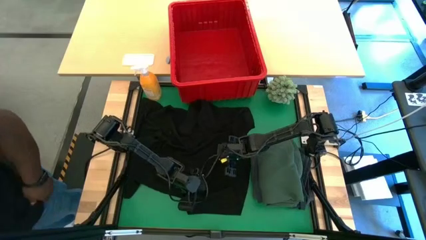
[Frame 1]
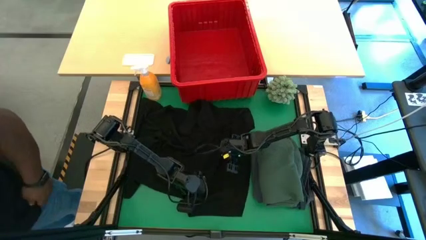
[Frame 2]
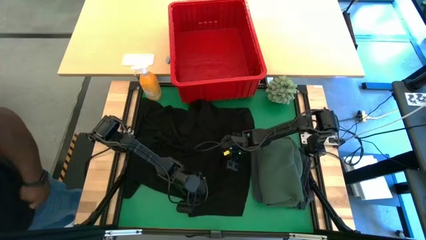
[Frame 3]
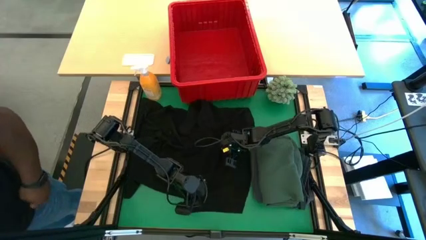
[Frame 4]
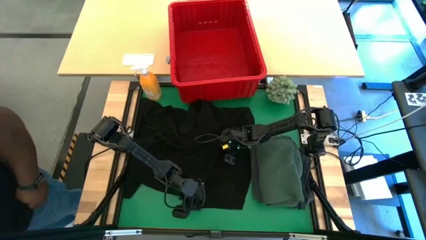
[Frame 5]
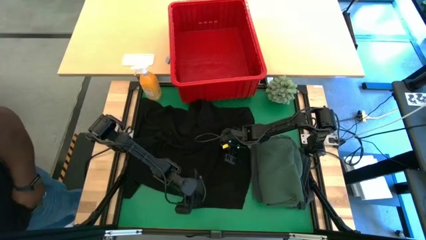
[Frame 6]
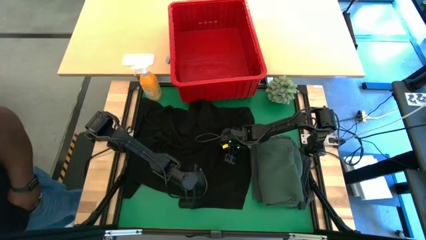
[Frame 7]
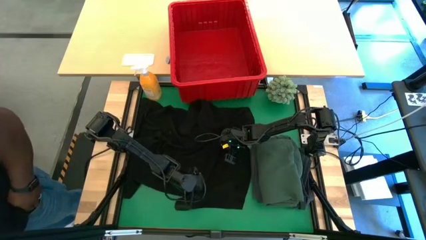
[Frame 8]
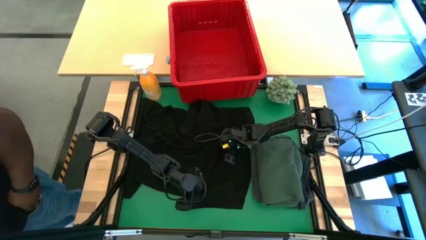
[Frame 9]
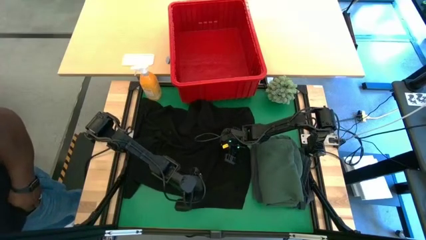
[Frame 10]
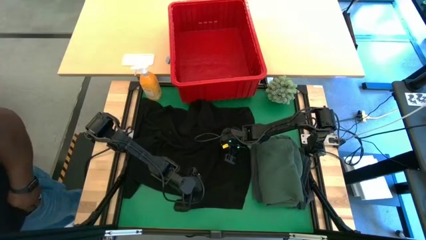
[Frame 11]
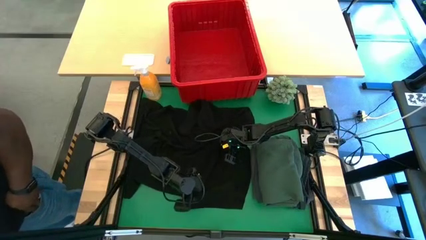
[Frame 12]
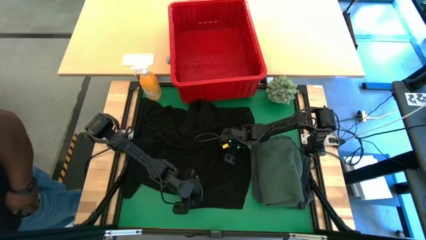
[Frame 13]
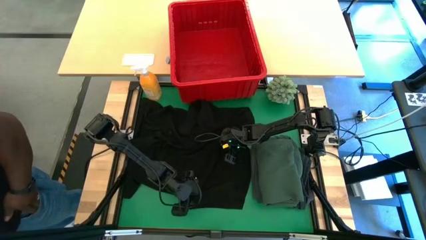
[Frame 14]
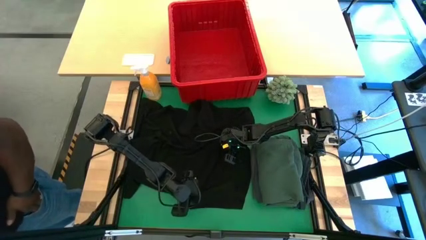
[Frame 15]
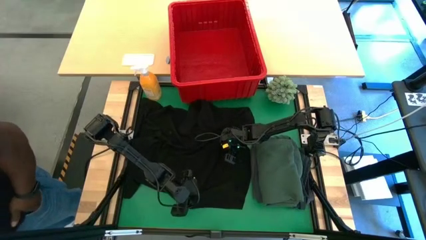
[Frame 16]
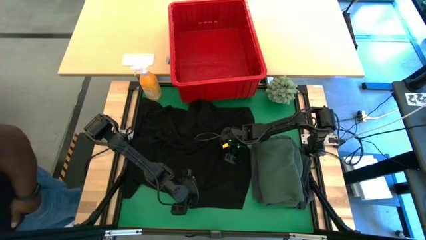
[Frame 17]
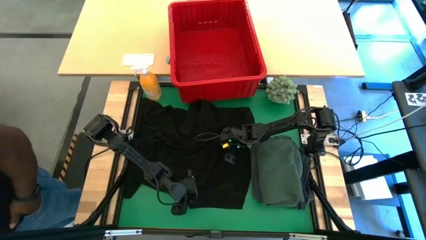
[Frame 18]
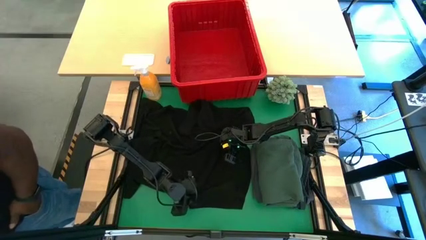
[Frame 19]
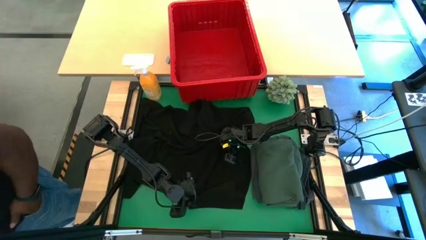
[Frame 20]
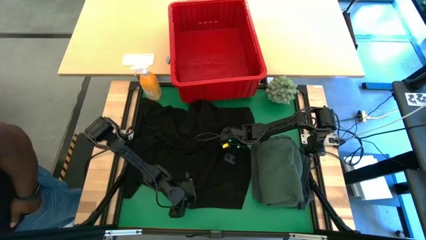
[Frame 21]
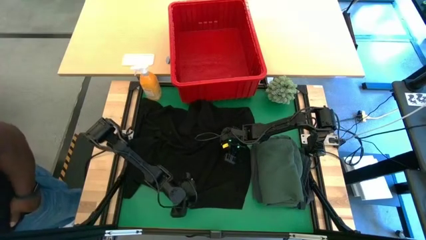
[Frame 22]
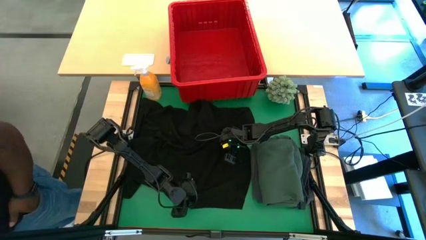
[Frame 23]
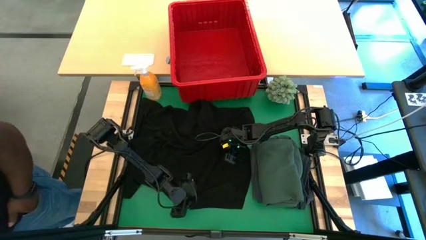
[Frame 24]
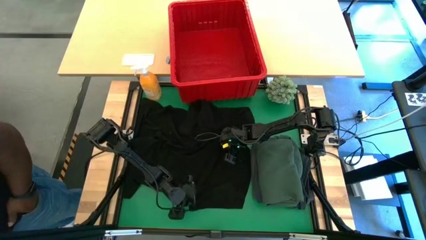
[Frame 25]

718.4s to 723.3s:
Task: Fold Laundry from Bin
Fold the black shirt

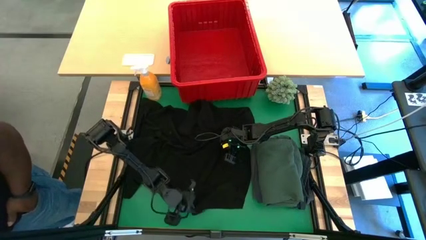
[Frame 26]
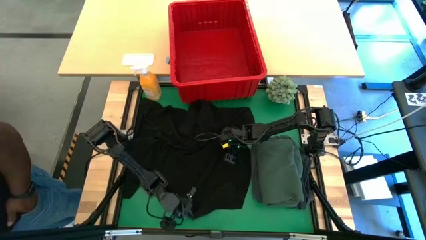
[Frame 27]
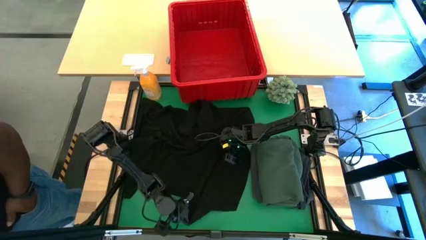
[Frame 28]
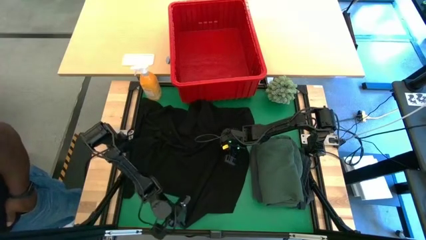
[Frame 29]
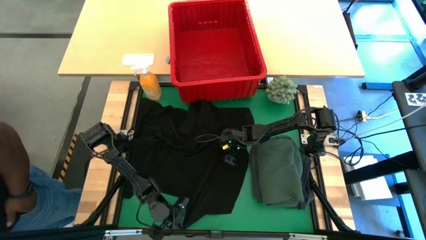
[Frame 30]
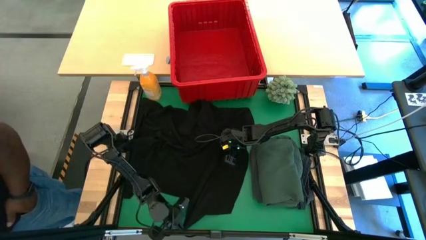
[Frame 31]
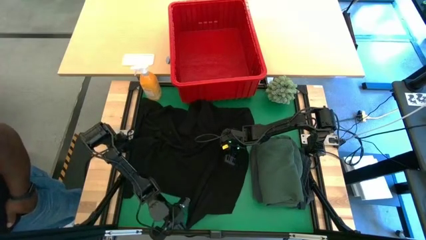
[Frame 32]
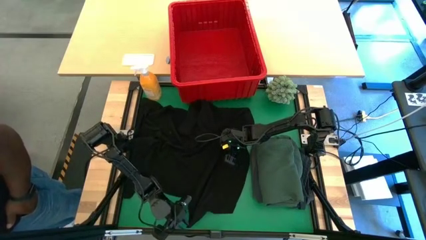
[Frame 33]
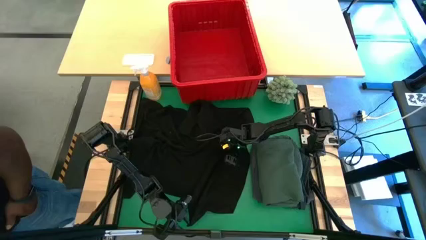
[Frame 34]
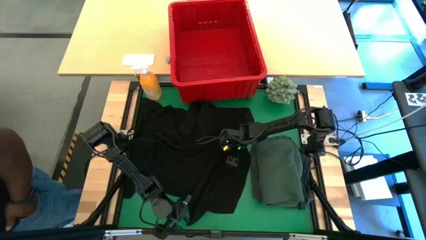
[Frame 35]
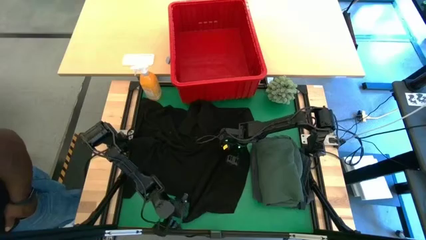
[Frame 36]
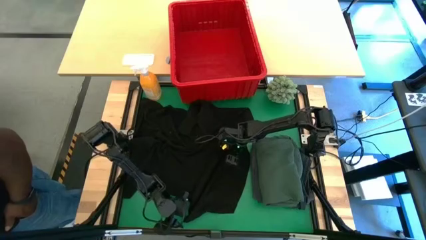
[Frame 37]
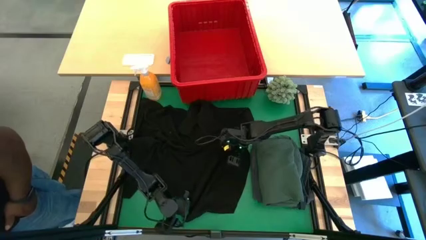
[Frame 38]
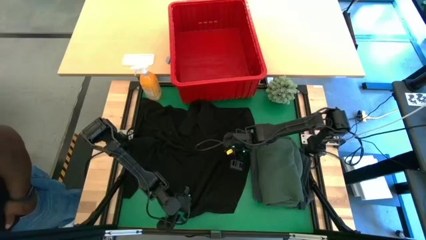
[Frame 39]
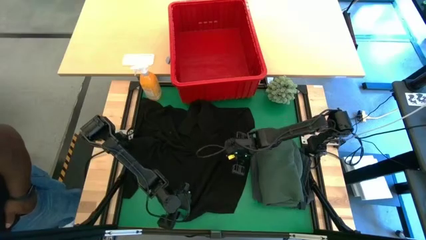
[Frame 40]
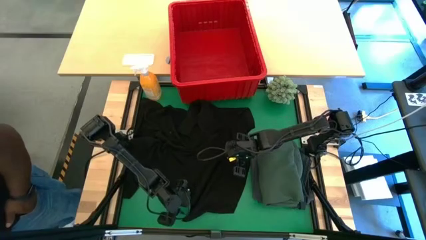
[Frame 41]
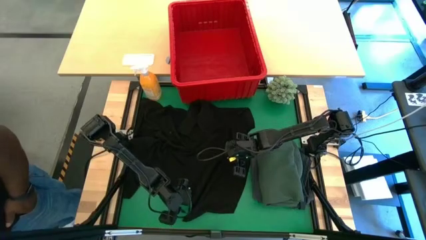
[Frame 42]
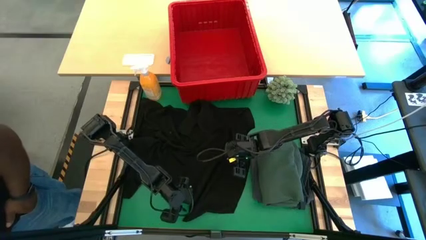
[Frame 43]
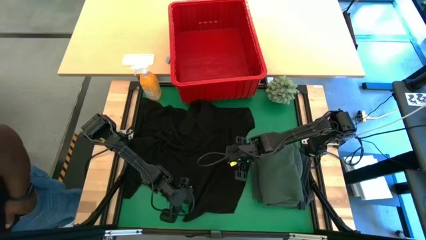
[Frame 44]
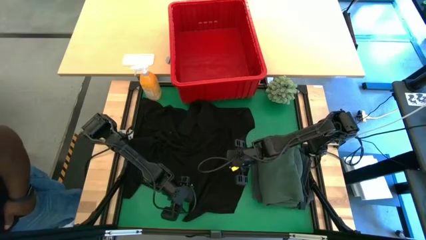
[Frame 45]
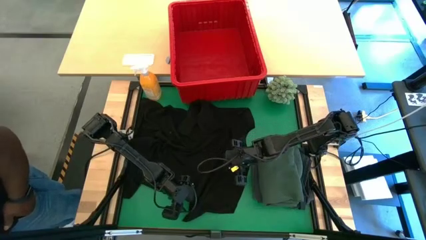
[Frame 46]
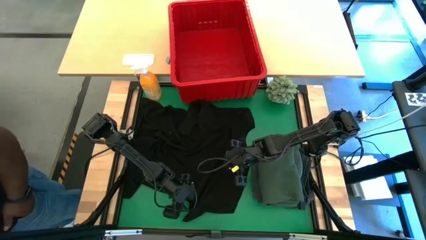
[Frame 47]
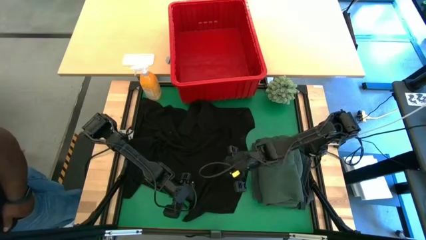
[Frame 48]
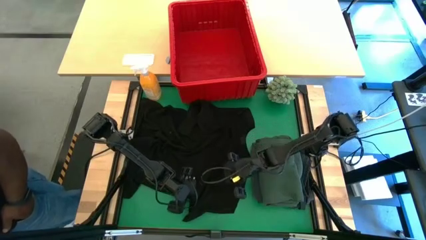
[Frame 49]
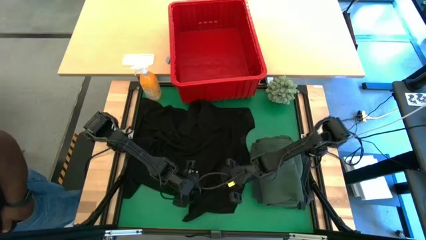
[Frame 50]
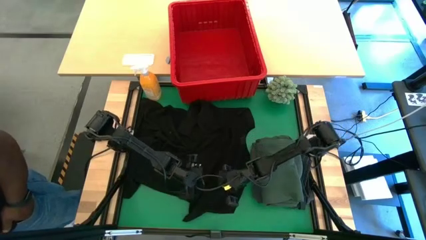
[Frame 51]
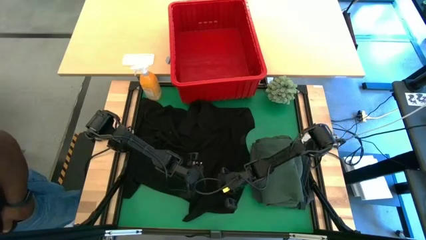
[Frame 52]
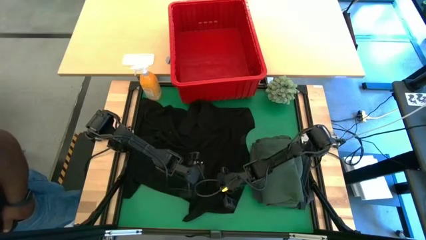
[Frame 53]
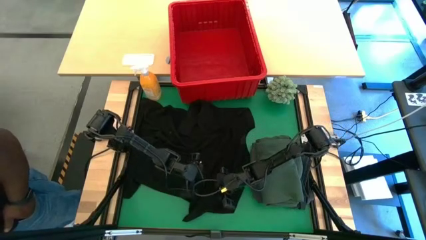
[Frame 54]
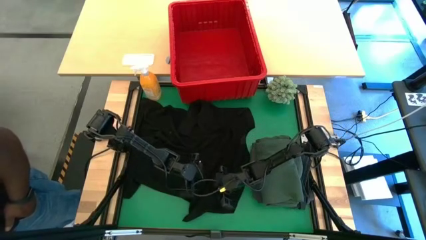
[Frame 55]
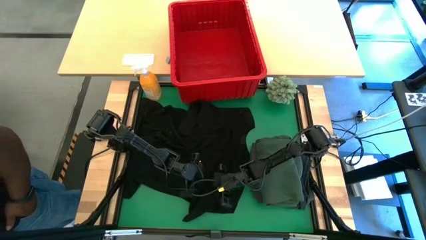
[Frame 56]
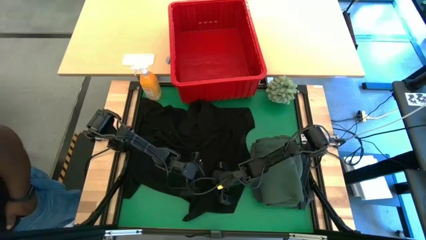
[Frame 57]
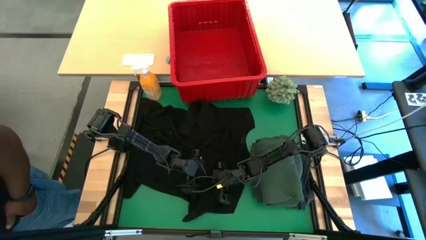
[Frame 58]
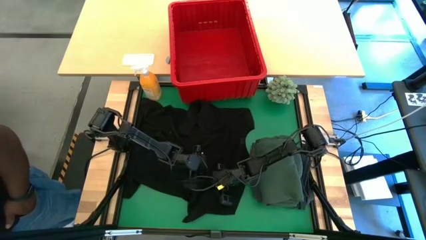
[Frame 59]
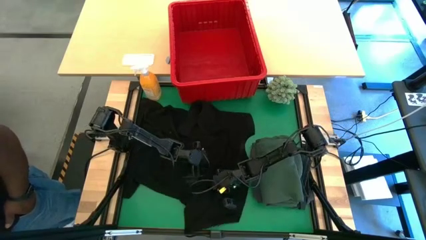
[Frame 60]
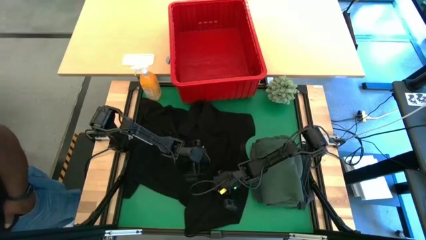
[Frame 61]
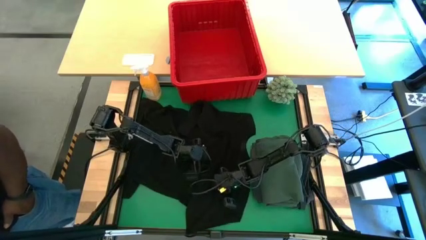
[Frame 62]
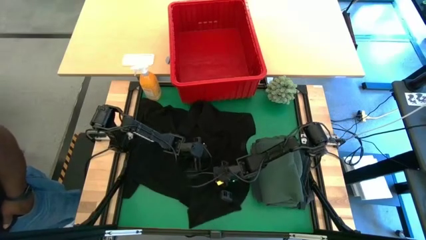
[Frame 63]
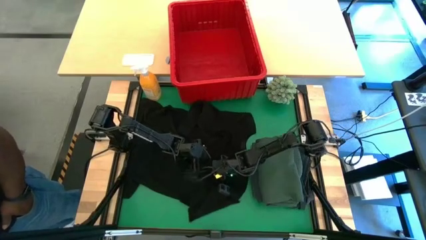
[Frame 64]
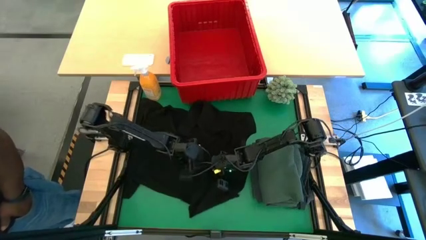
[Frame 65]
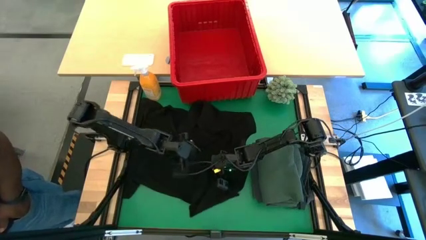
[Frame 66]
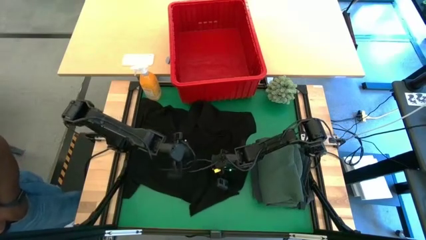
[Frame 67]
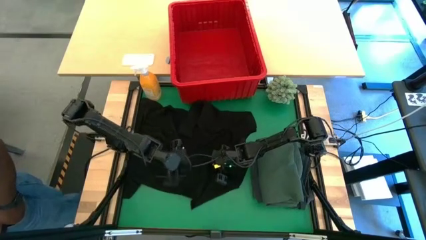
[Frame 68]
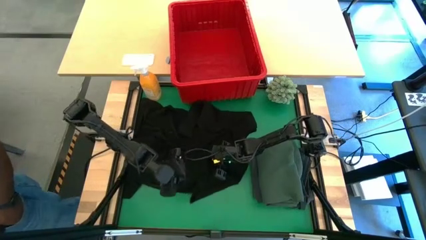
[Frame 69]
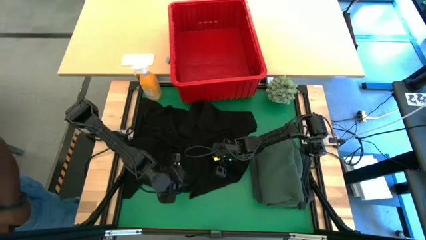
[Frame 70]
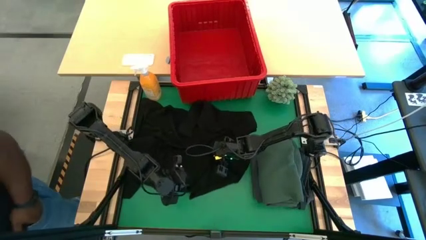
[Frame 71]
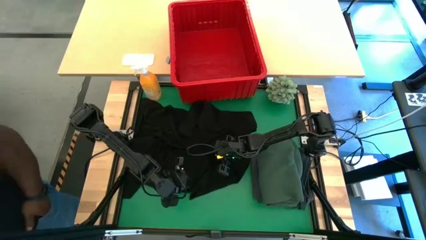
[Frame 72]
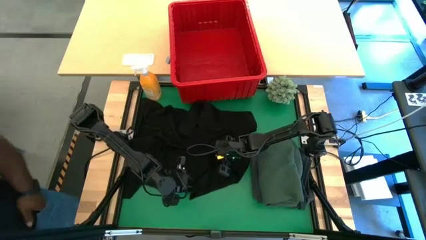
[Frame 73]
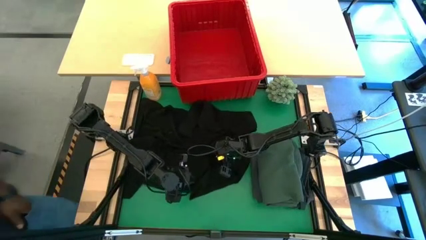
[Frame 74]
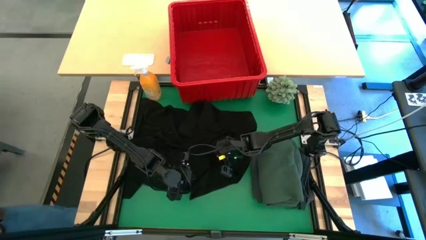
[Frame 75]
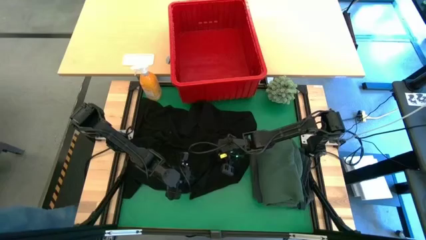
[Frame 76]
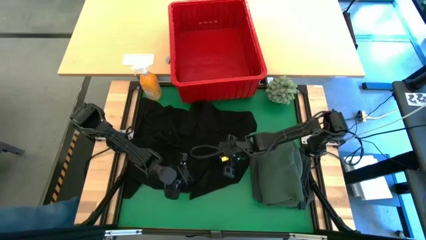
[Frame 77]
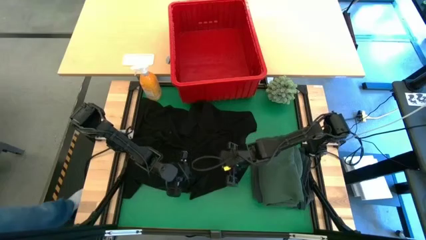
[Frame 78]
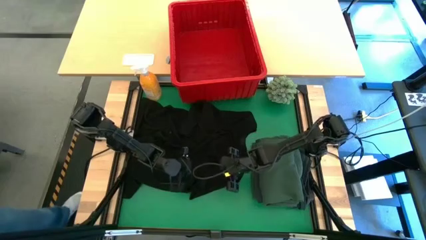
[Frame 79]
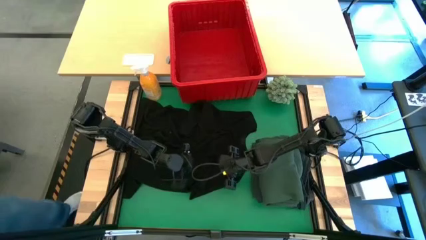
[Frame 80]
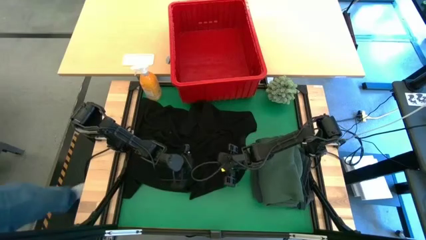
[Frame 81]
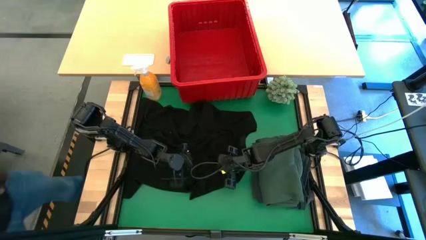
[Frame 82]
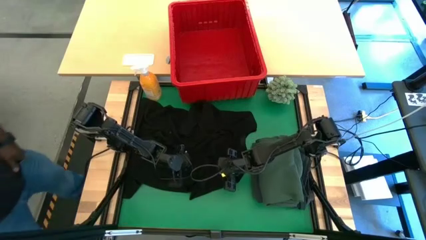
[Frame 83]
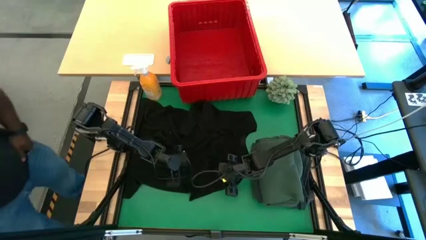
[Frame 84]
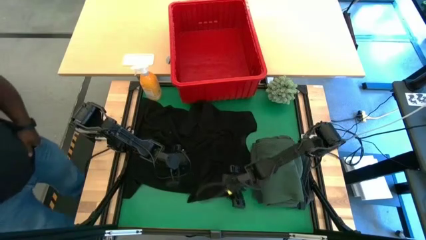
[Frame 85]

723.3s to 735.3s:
Fold the black shirt
